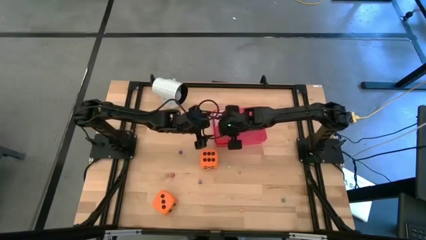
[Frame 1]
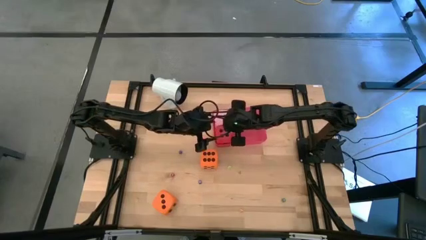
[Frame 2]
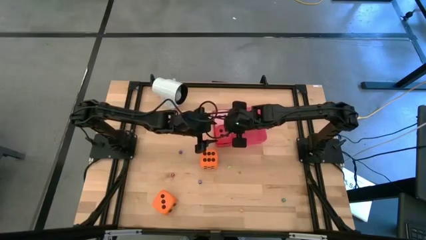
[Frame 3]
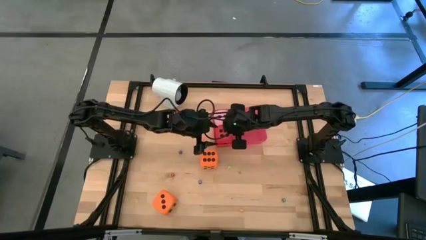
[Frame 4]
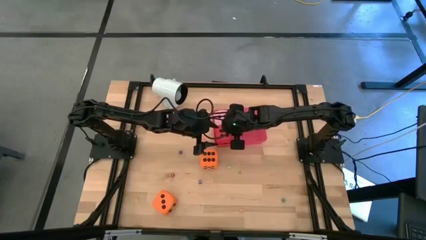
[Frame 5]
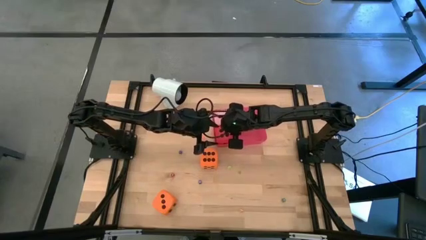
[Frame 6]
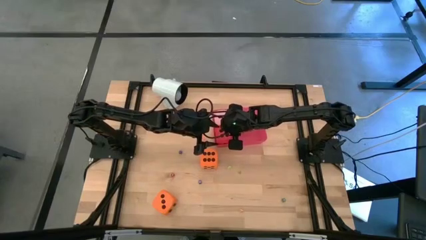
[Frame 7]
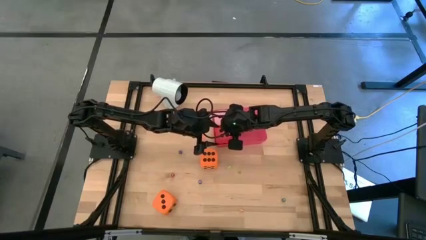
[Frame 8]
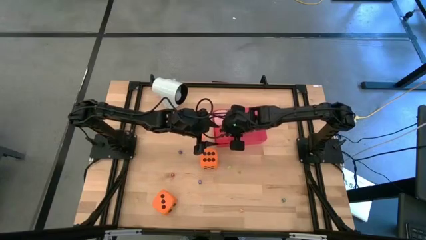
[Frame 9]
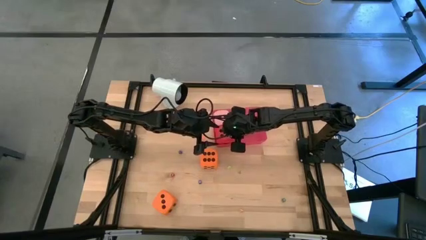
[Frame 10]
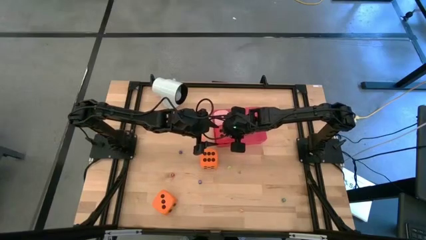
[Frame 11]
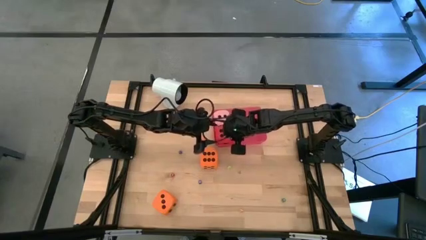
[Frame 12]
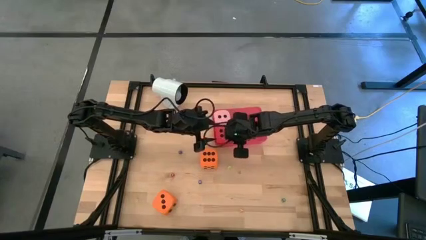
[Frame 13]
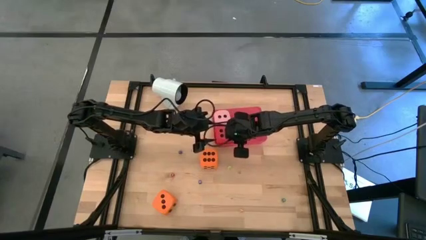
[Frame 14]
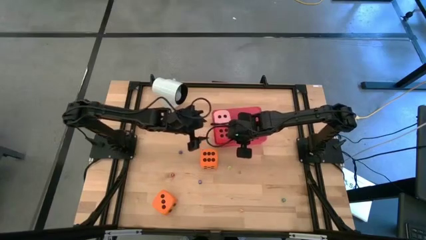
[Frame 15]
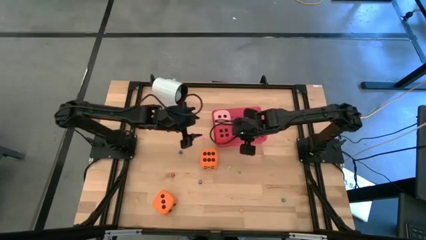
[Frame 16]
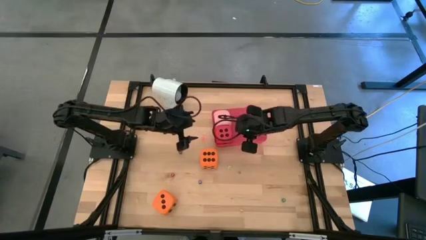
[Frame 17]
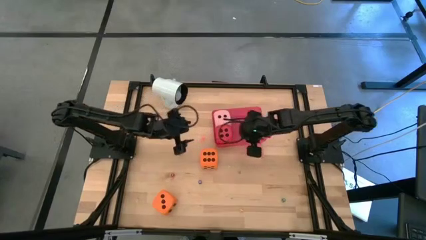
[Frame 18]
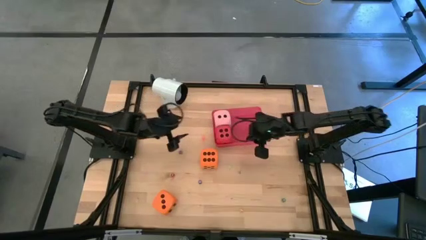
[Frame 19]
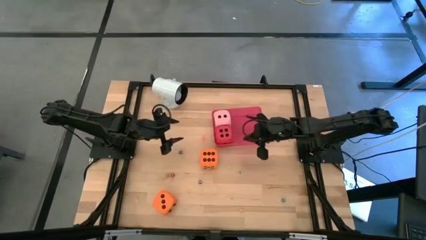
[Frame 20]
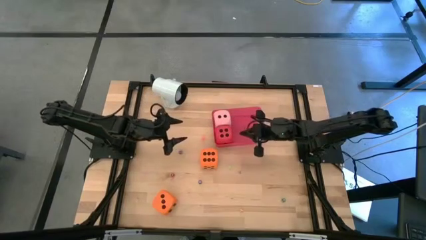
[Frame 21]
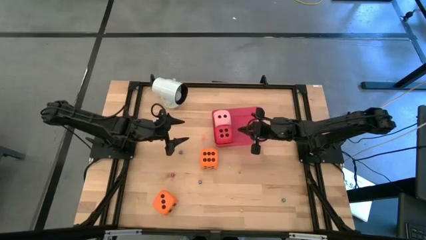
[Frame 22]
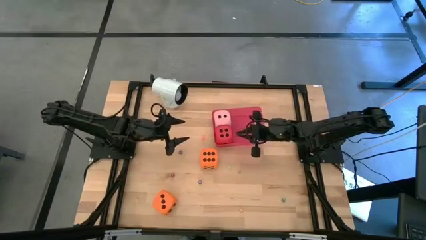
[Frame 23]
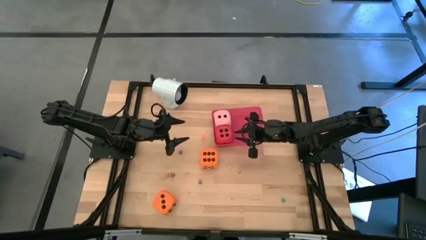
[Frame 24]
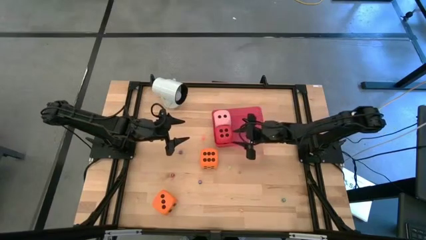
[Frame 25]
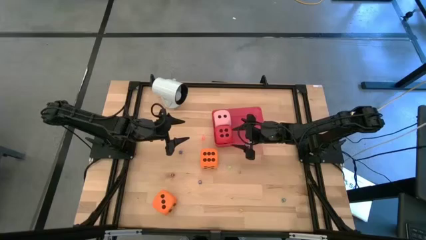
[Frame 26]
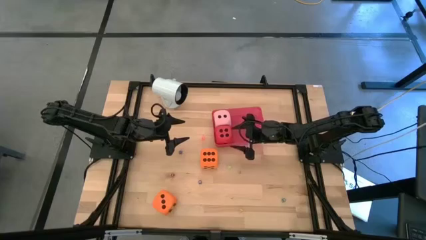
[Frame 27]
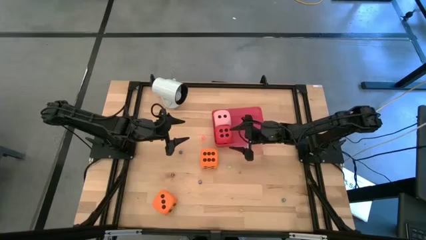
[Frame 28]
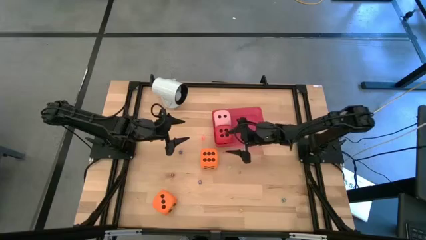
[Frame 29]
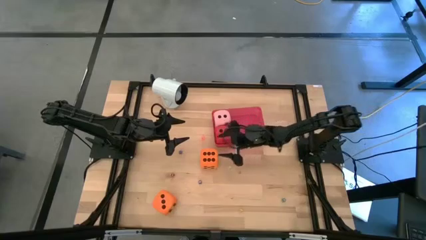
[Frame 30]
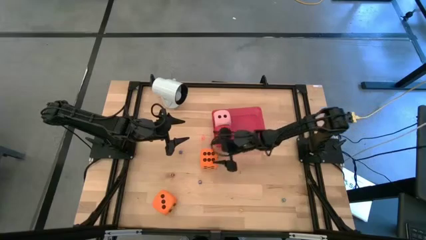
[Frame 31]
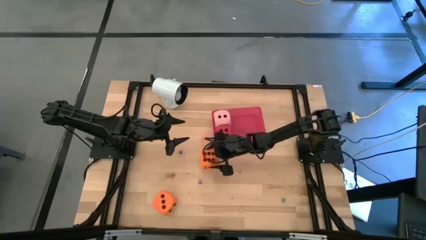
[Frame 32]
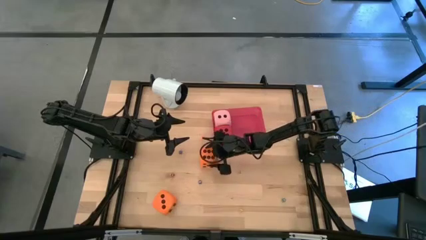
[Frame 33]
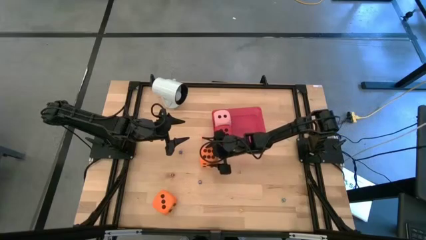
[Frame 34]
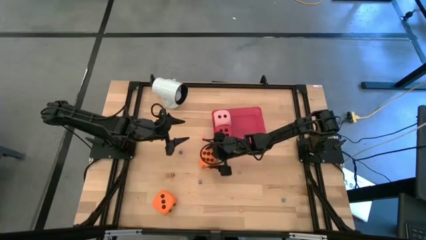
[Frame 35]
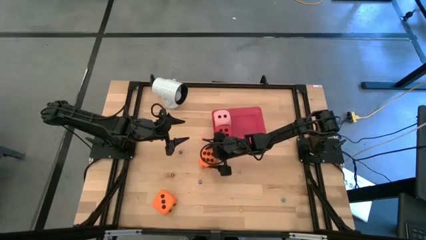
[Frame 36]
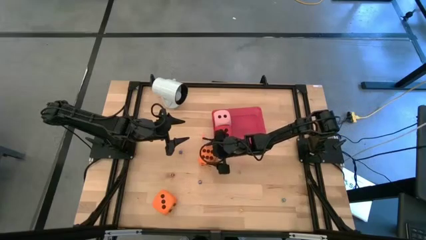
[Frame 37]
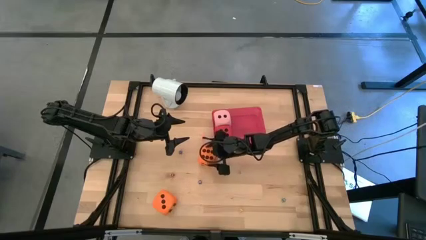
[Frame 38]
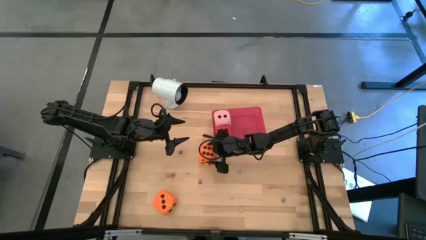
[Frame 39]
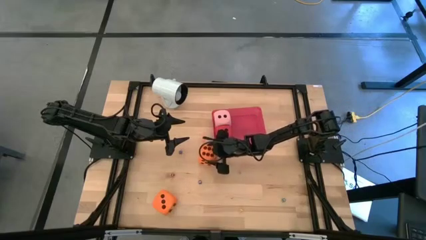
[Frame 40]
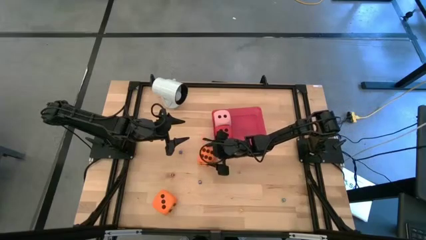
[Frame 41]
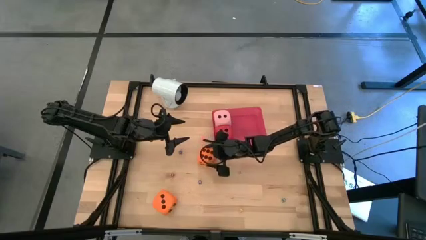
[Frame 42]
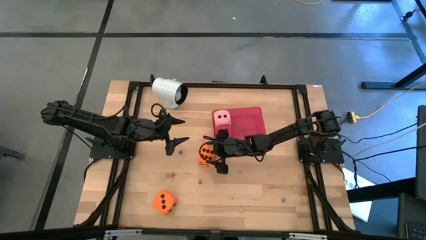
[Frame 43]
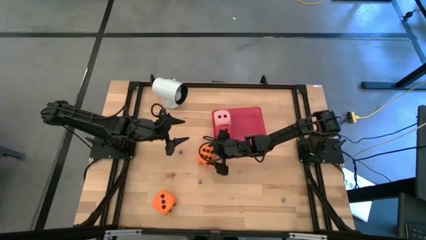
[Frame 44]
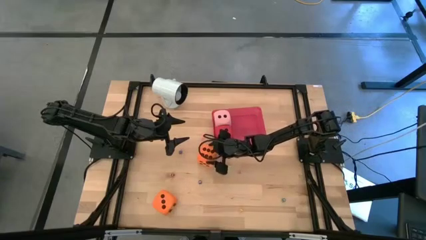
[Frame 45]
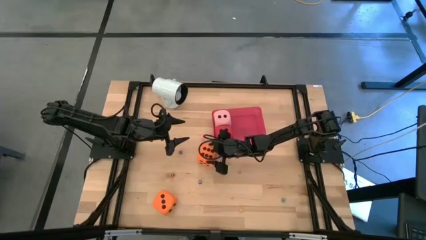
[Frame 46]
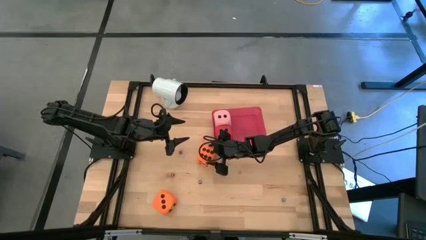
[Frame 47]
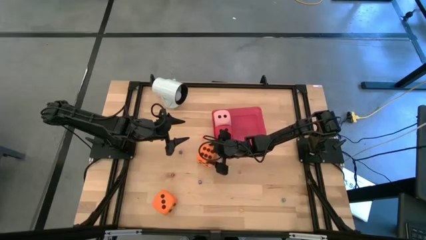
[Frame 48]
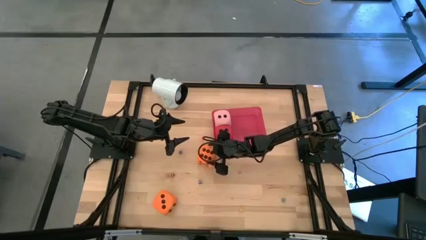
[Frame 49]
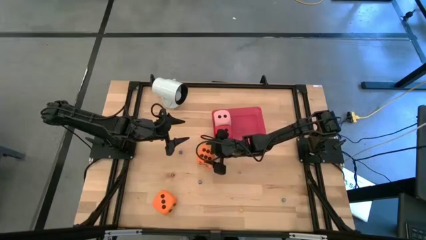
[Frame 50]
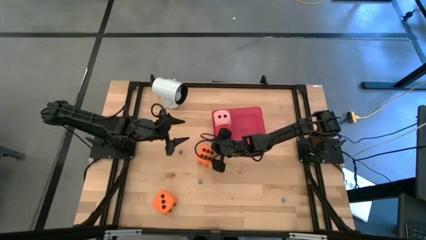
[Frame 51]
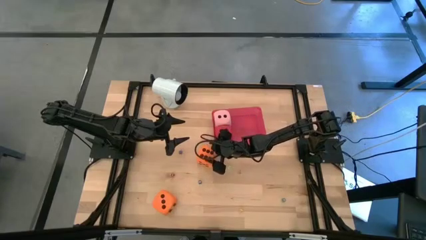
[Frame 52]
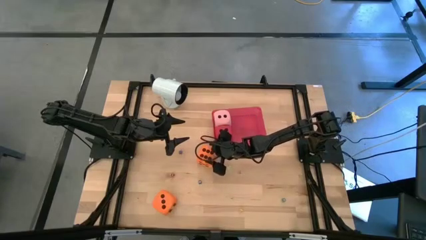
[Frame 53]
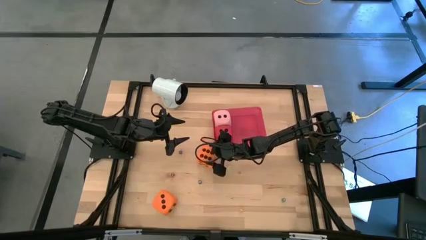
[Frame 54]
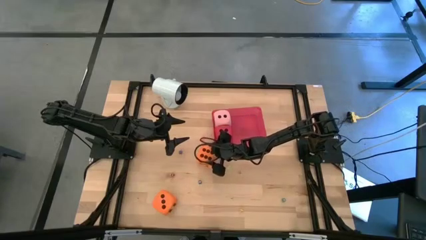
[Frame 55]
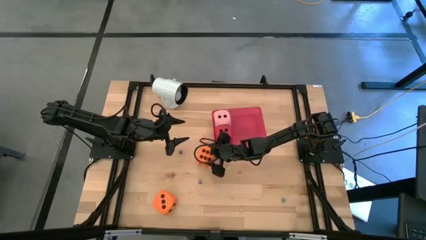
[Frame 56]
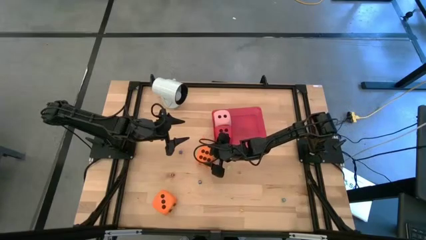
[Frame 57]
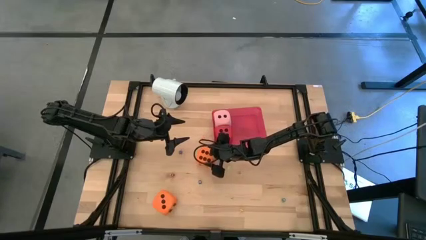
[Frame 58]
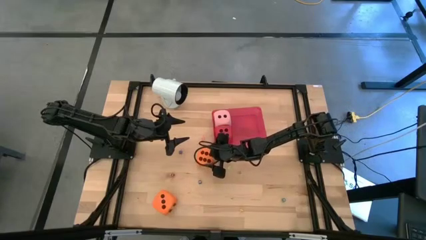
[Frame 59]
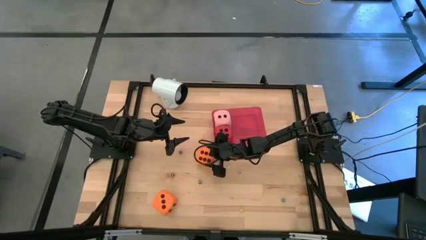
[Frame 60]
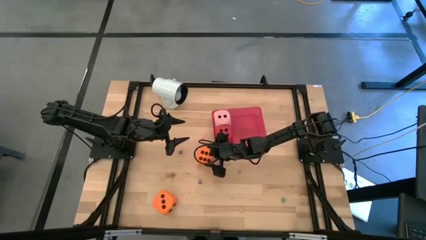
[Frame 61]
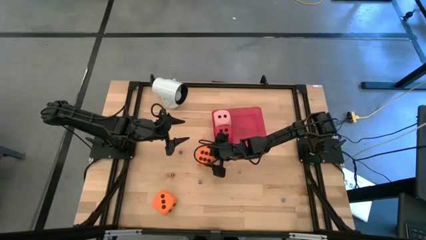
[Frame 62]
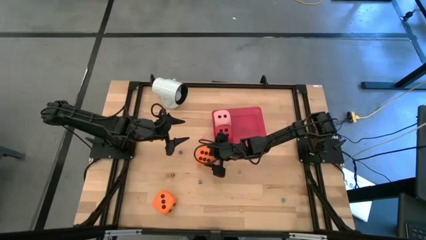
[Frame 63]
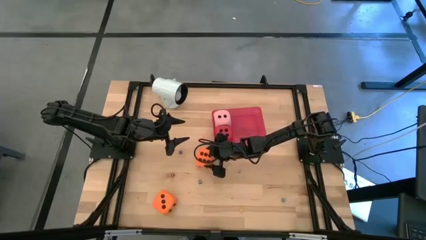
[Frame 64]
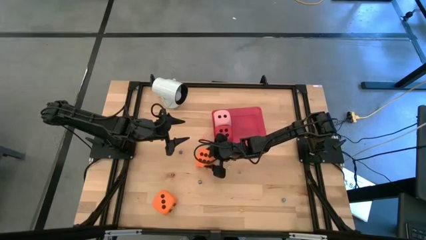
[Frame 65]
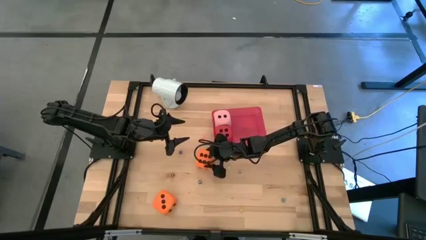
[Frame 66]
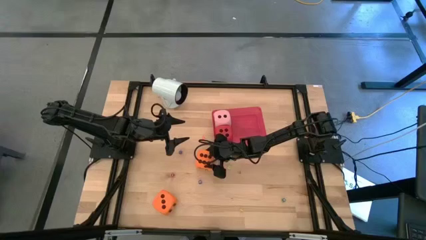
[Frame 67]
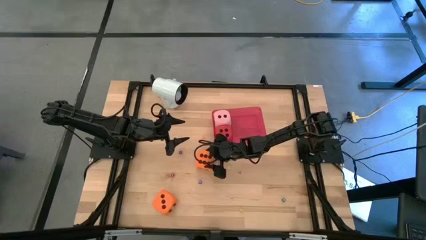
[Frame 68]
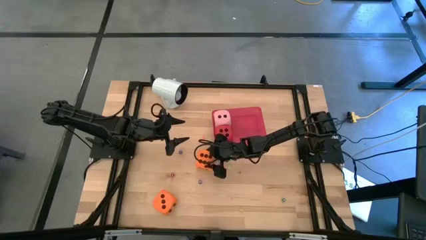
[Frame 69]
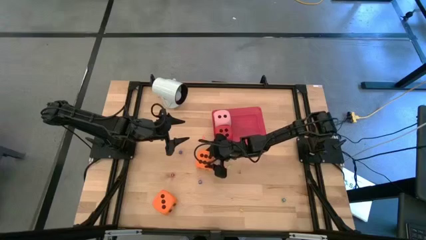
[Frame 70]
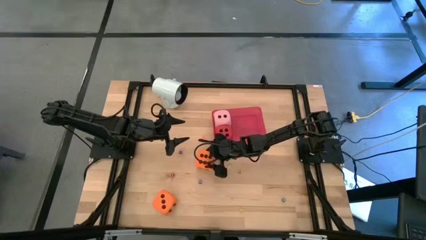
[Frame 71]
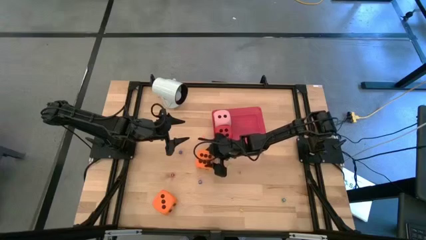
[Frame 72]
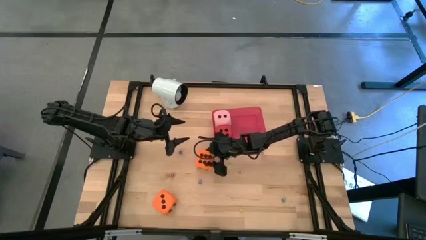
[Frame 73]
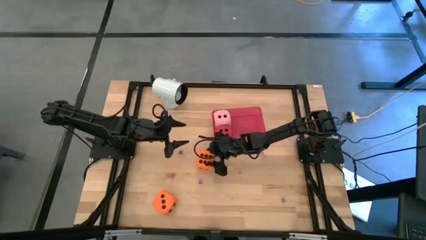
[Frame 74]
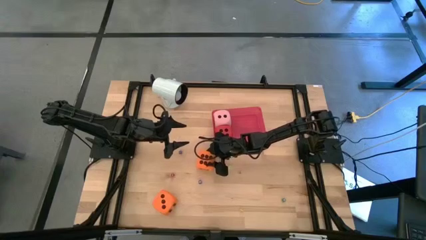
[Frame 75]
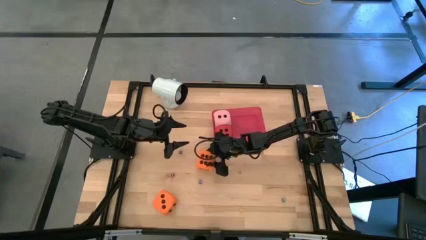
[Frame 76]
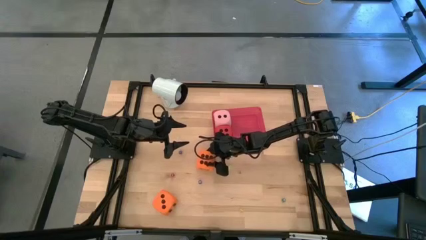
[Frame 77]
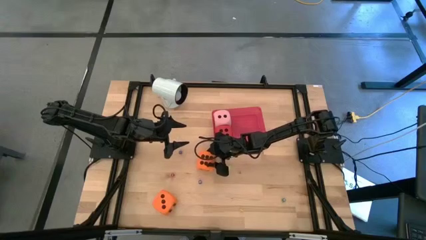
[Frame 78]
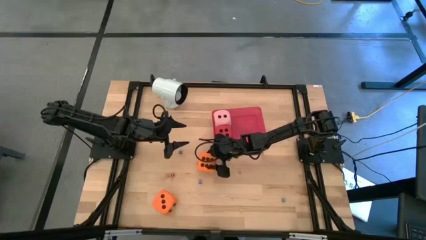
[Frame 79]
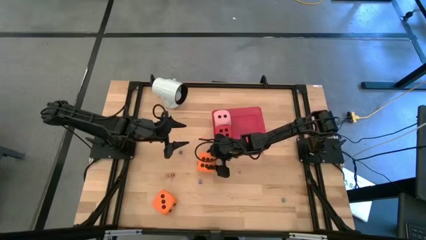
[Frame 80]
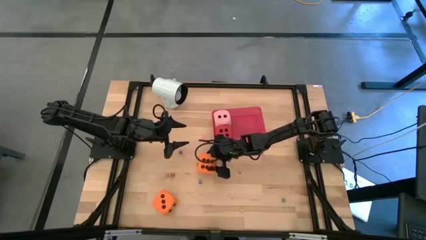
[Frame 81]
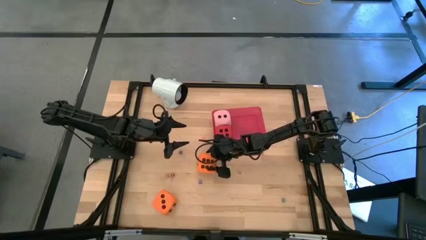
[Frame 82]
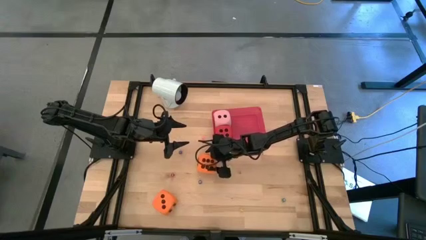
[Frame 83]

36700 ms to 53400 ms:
Task: Pick & Place Dice
Put the big top orange dice into the red bin
